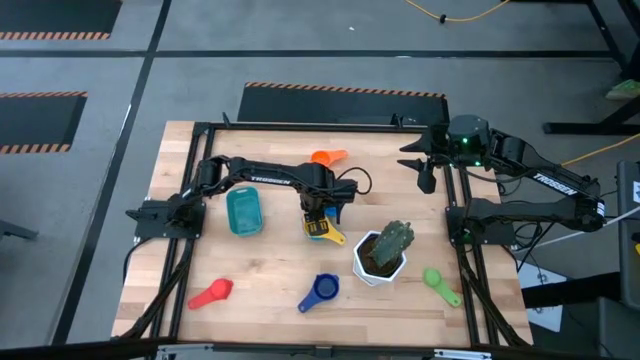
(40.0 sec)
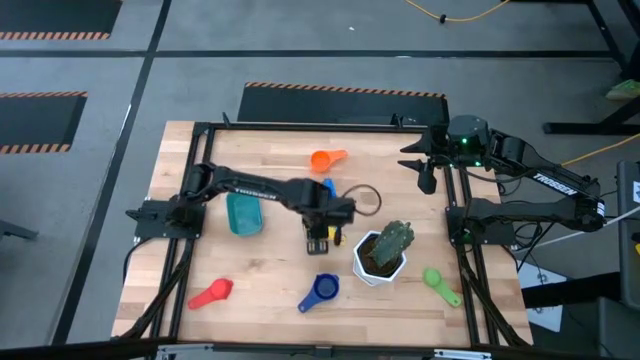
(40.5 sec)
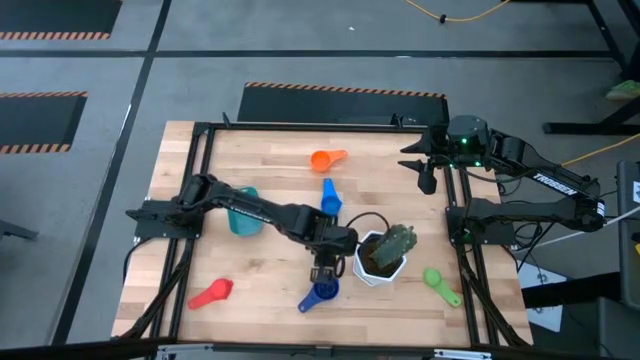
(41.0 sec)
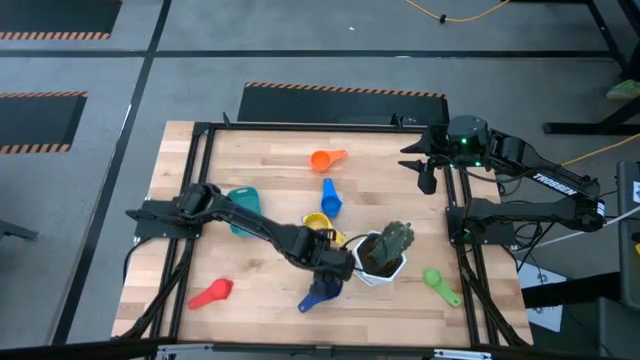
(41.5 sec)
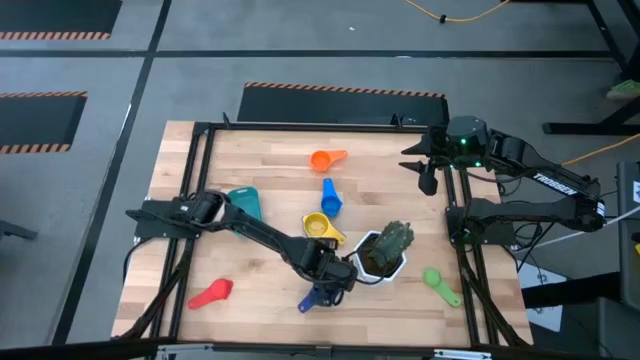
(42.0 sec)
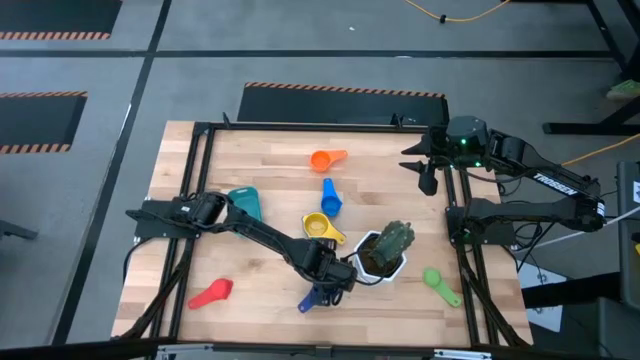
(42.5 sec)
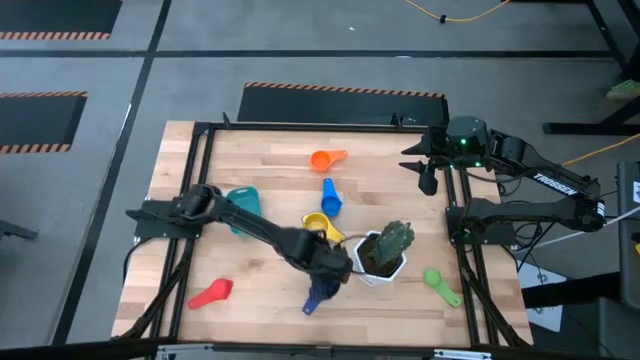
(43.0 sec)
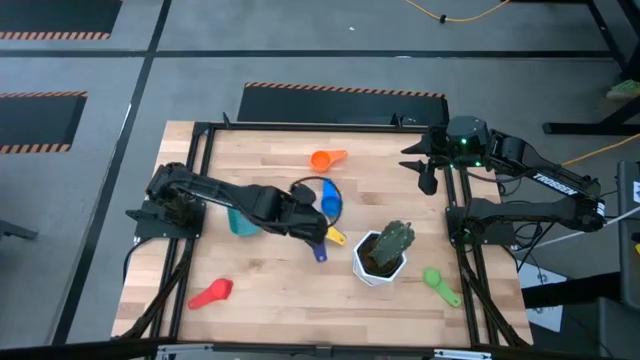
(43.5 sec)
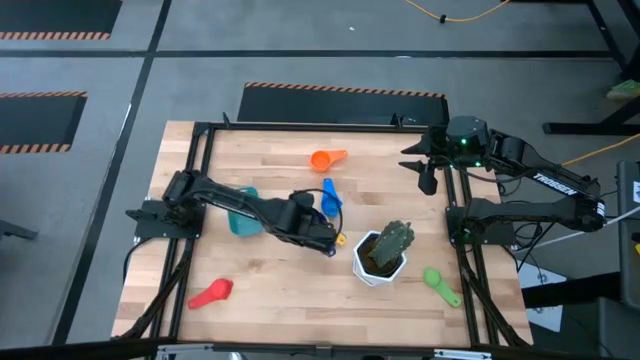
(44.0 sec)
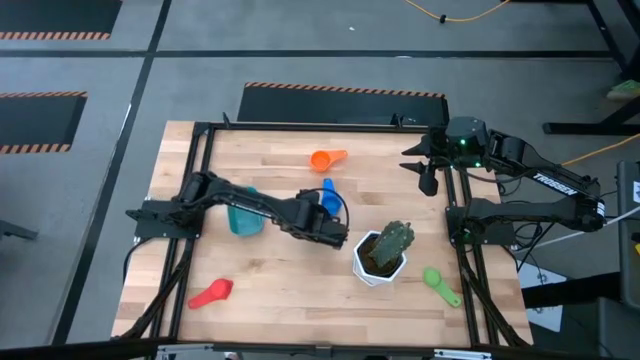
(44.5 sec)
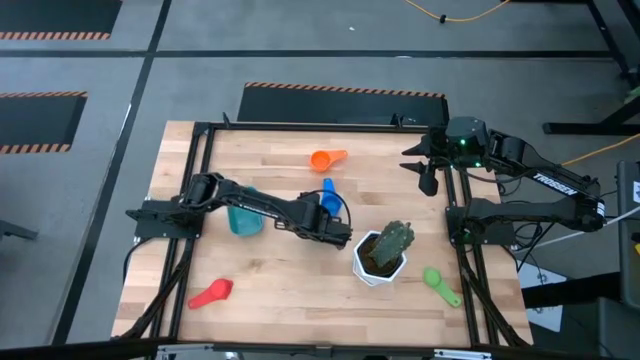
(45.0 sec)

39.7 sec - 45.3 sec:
Task: Nest measuring cups in basket
Stack the dark blue measuring cup on top of the yellow measuring cup

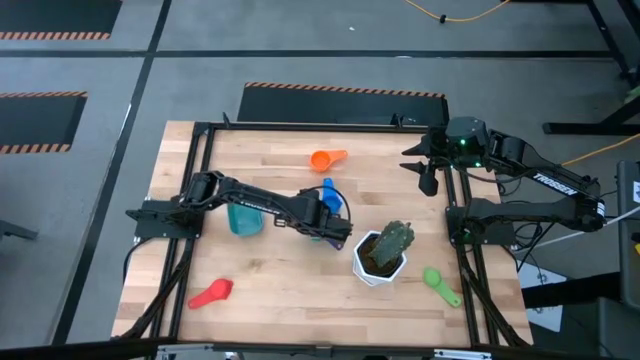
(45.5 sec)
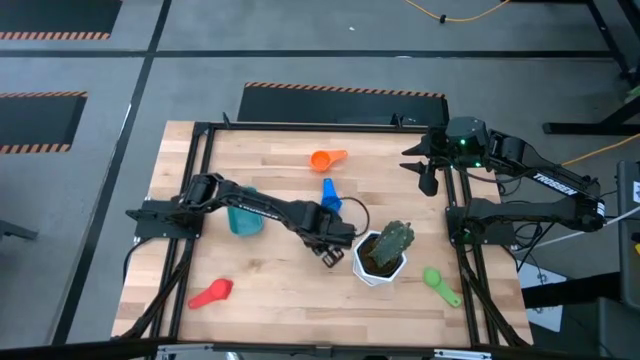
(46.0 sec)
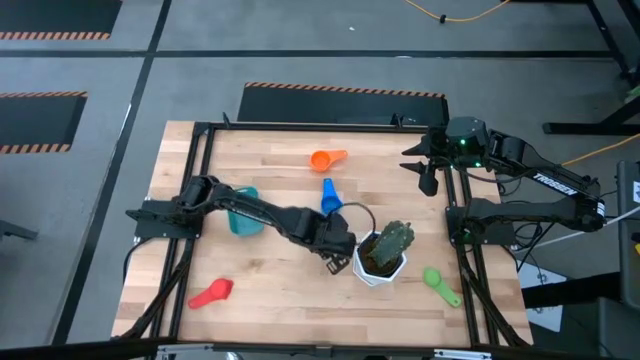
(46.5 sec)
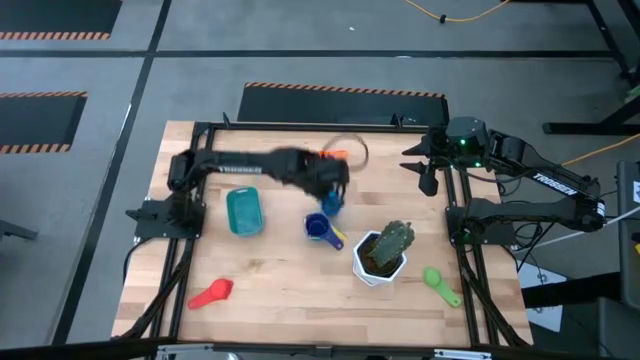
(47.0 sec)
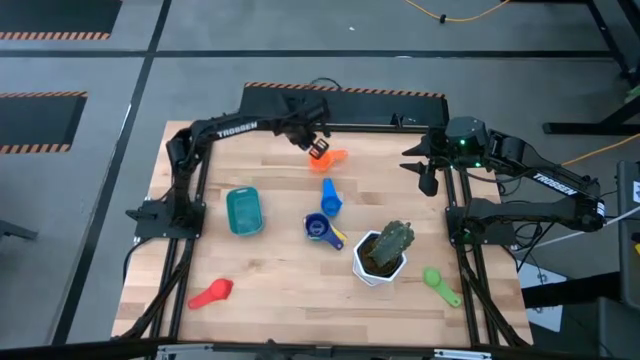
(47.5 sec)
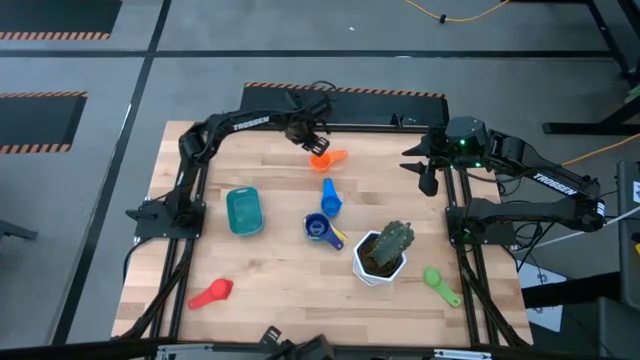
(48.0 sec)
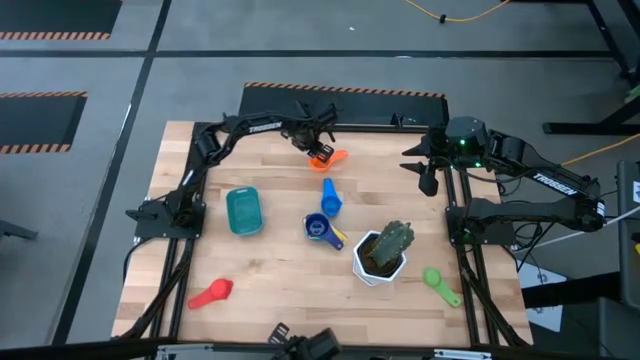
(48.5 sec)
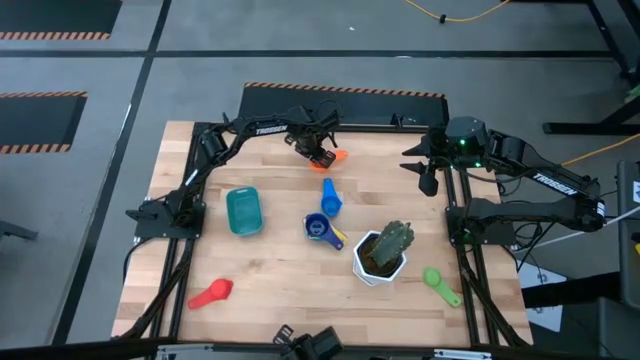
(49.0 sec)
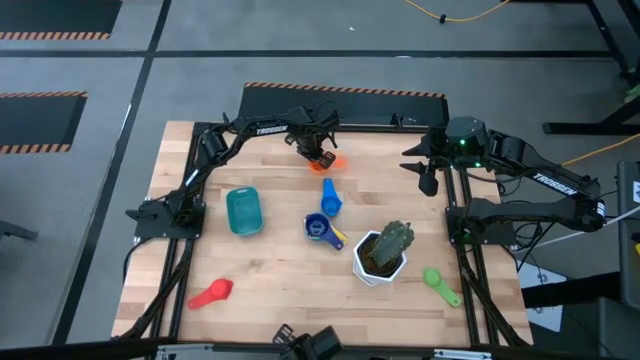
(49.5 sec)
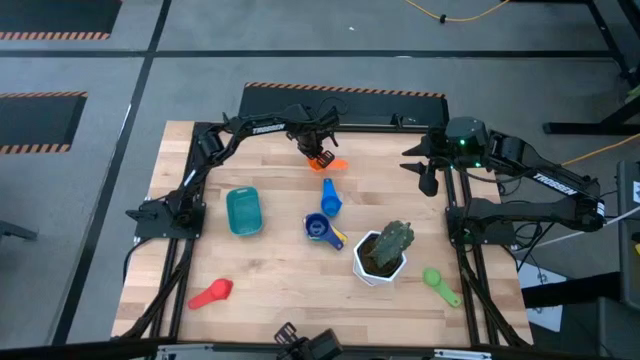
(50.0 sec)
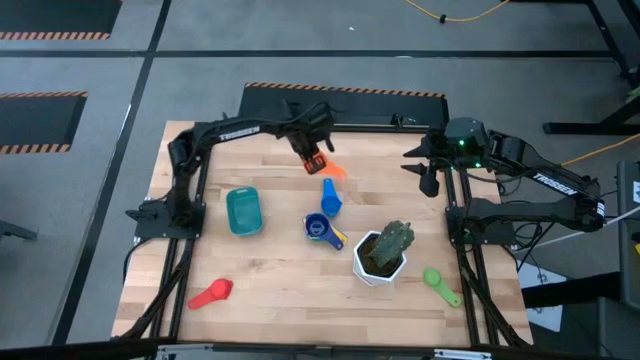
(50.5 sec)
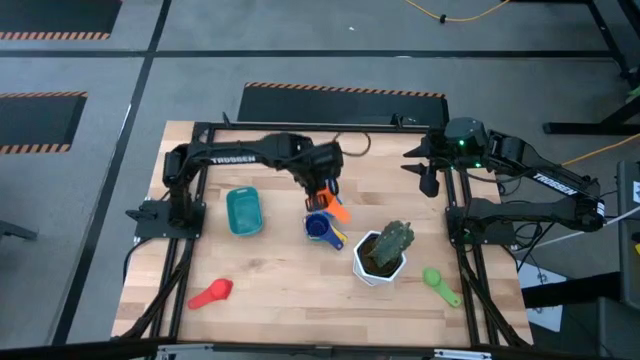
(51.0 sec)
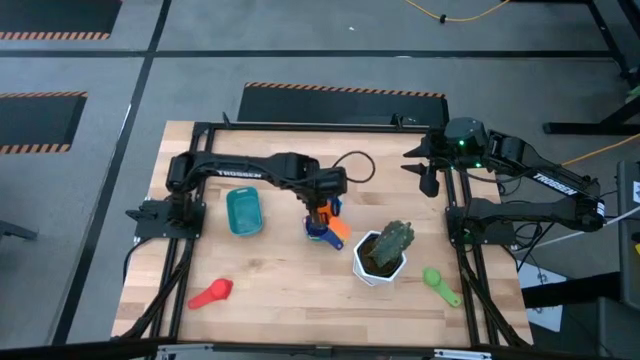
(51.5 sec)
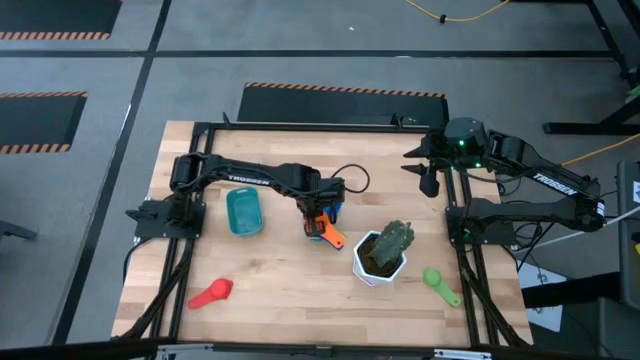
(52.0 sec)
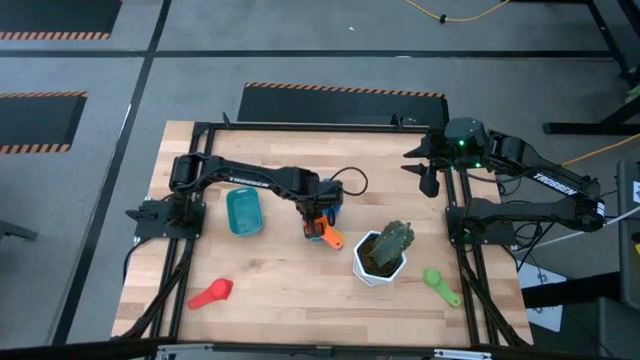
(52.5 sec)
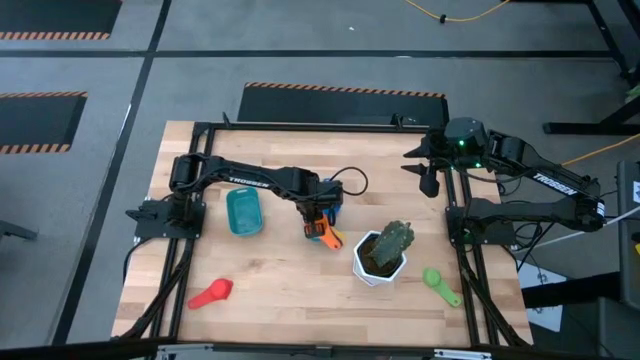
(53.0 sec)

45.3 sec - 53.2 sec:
Stack the orange measuring cup on top of the dark blue measuring cup

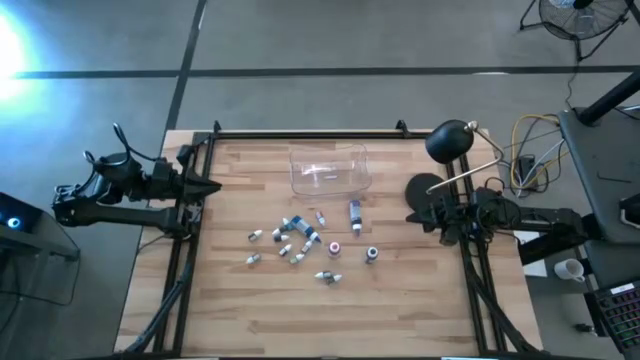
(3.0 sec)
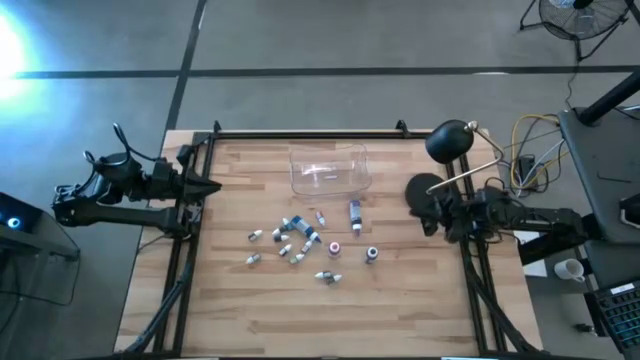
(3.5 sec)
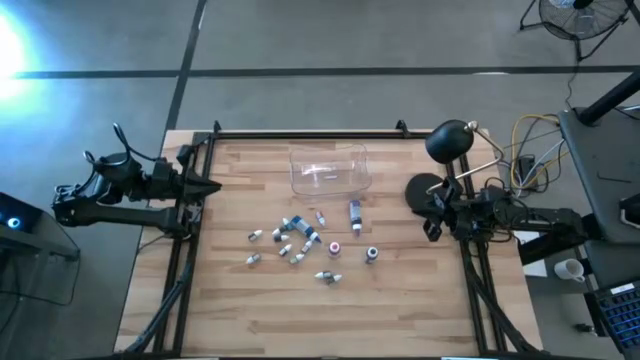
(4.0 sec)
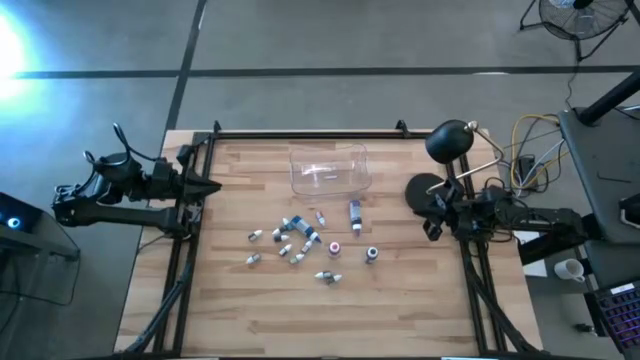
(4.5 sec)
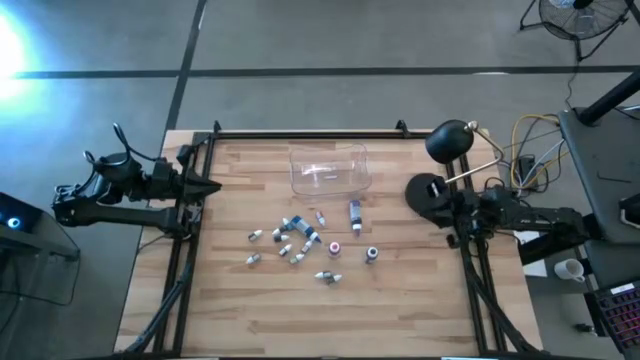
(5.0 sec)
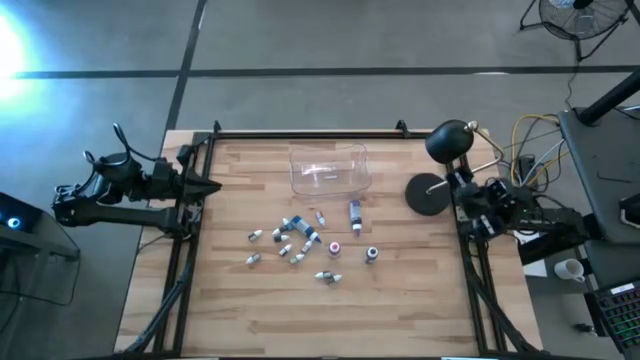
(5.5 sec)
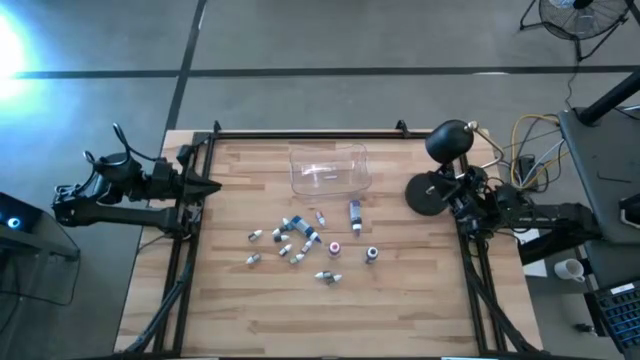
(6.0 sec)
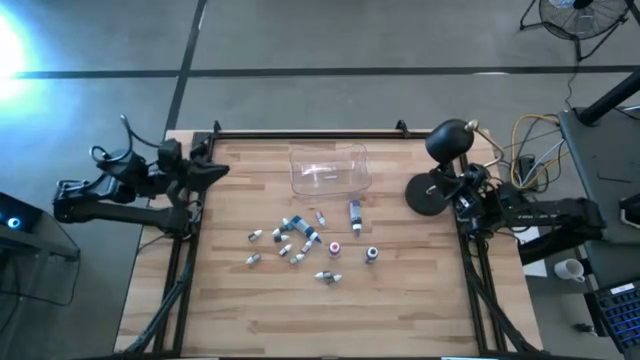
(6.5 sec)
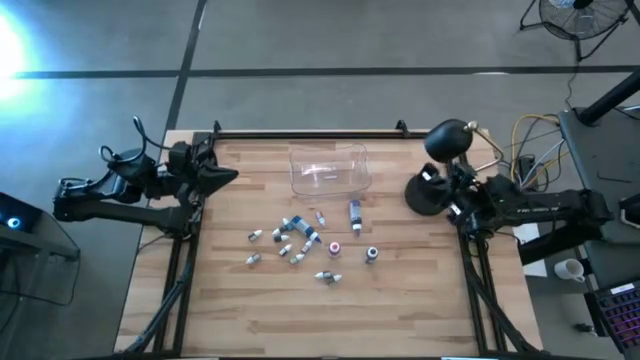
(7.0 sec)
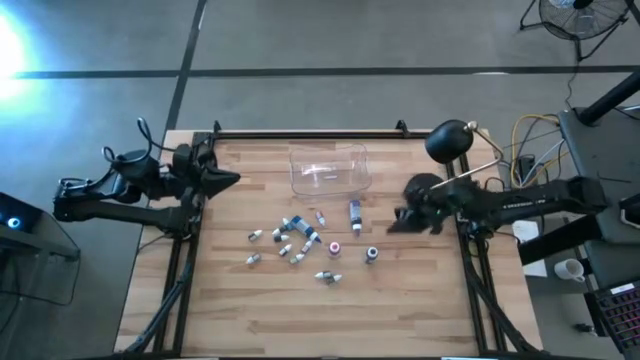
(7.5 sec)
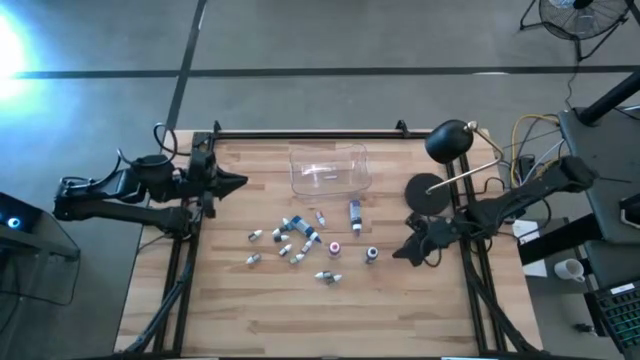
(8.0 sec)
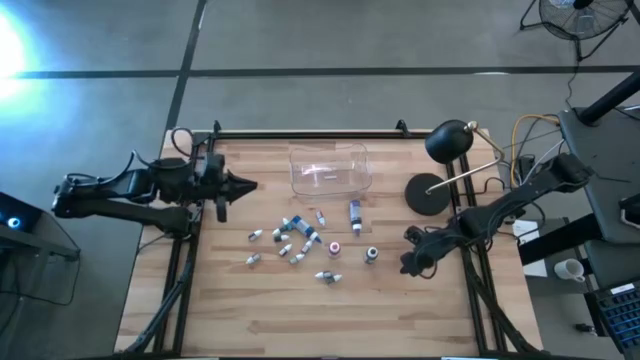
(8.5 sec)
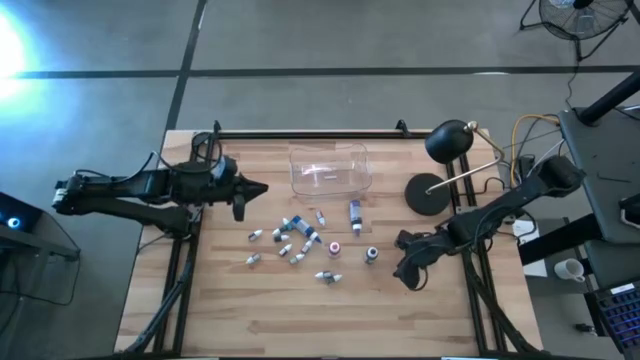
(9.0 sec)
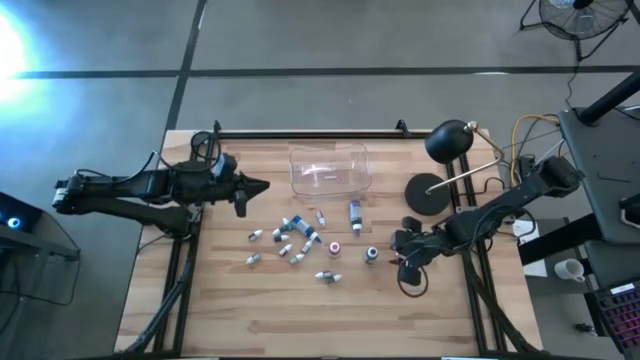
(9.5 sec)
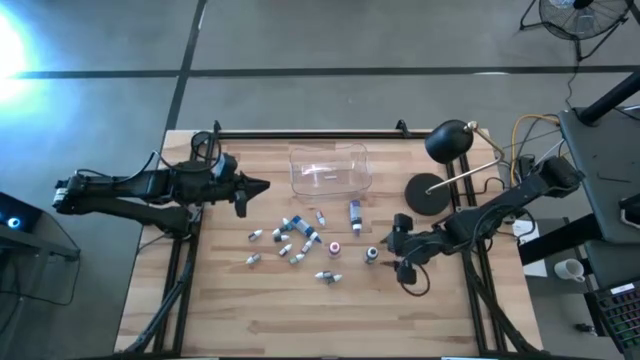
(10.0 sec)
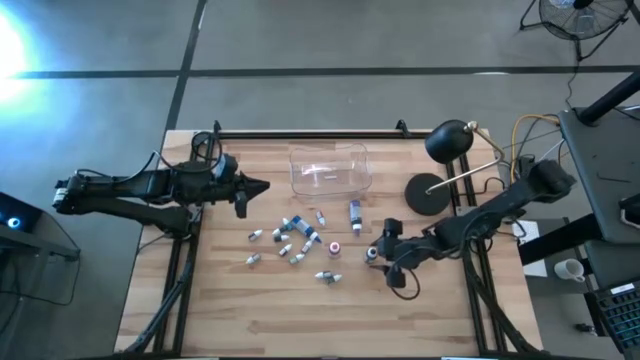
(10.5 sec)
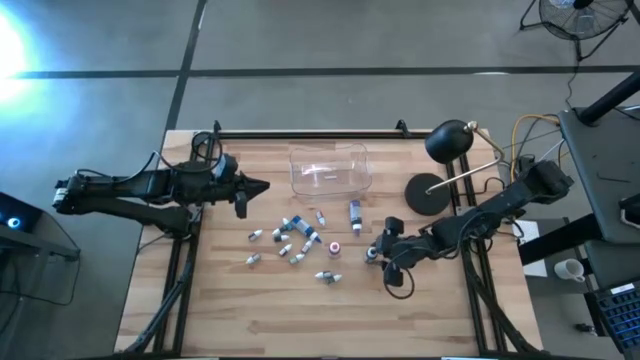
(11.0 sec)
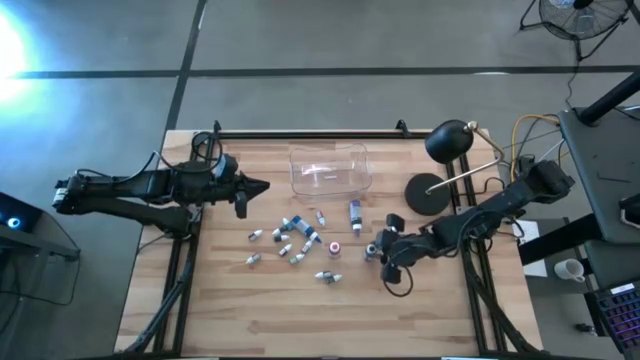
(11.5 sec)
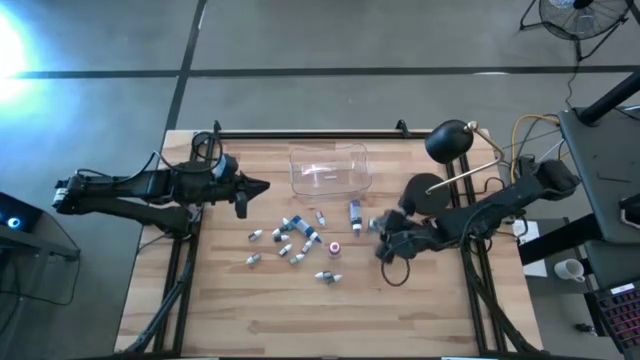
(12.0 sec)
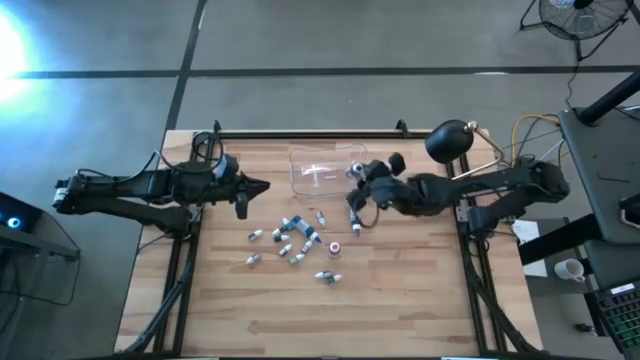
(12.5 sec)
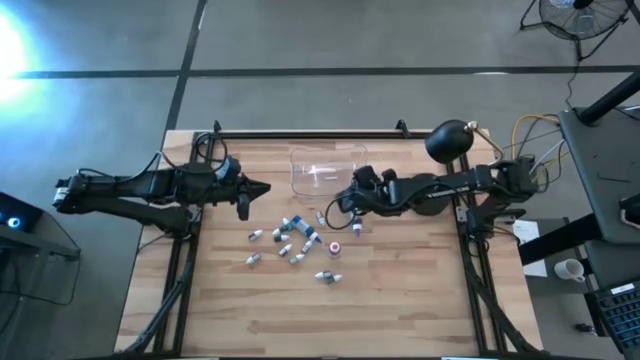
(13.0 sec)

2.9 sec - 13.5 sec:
Task: Pick & Place food coloring
Put the large black food coloring bottle into the transparent bin
